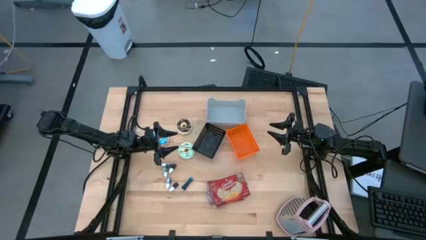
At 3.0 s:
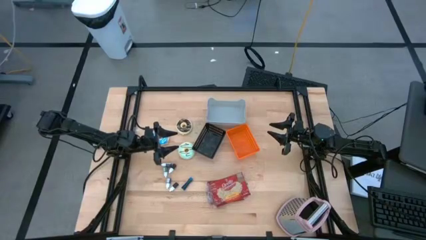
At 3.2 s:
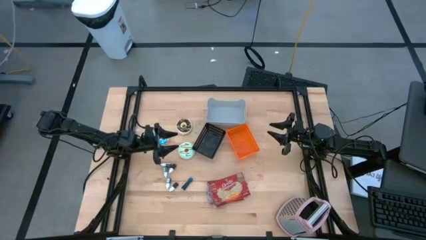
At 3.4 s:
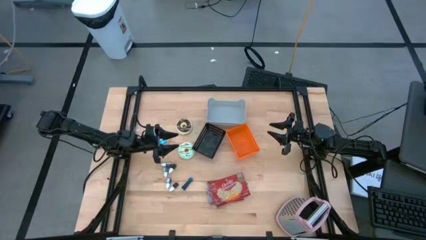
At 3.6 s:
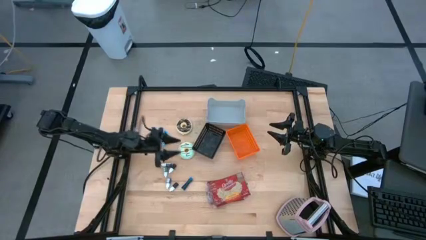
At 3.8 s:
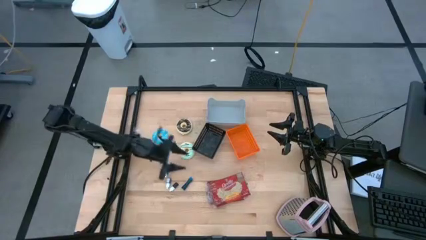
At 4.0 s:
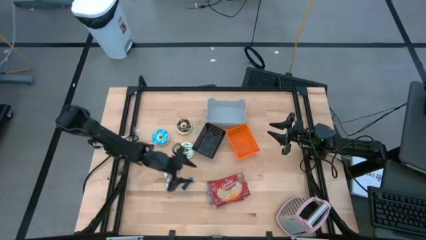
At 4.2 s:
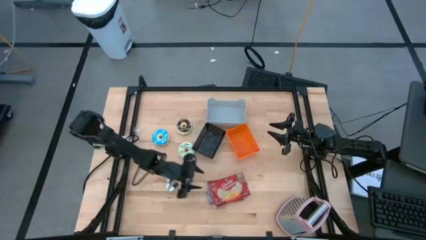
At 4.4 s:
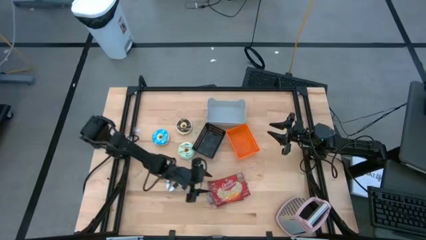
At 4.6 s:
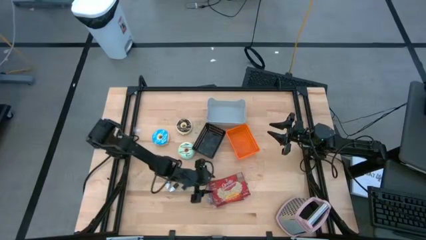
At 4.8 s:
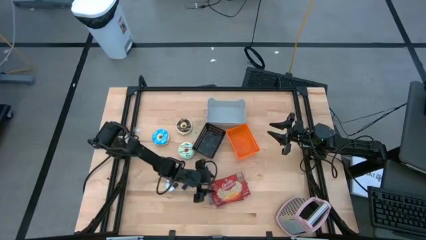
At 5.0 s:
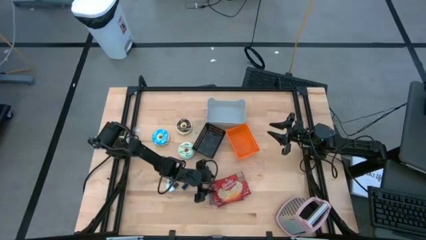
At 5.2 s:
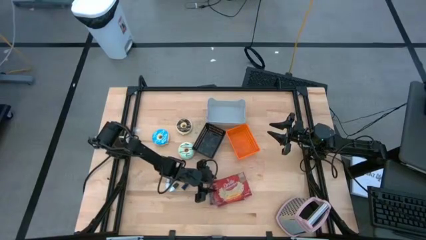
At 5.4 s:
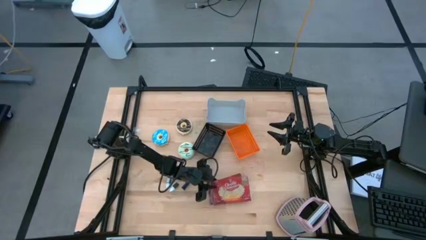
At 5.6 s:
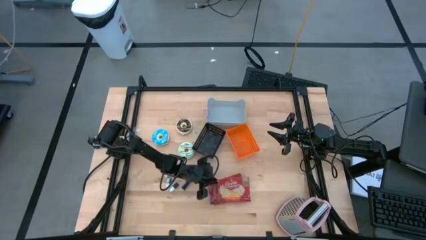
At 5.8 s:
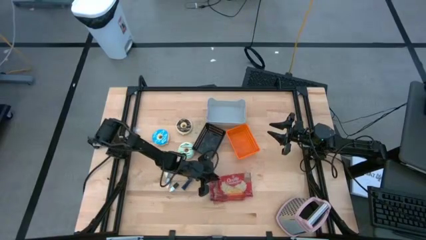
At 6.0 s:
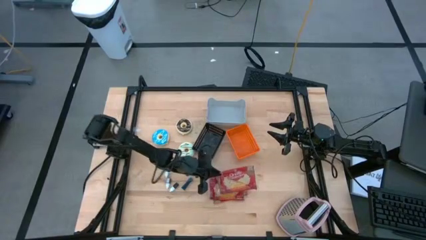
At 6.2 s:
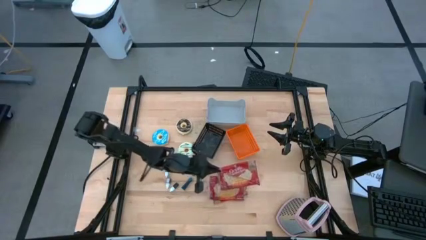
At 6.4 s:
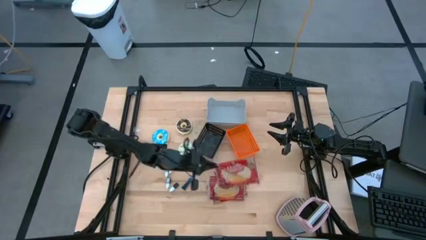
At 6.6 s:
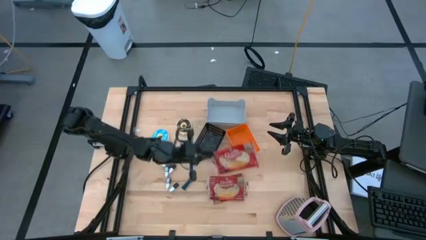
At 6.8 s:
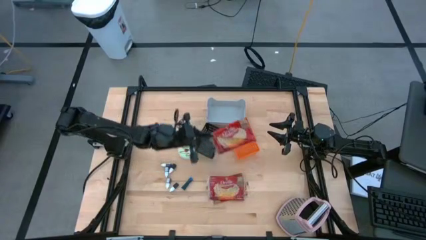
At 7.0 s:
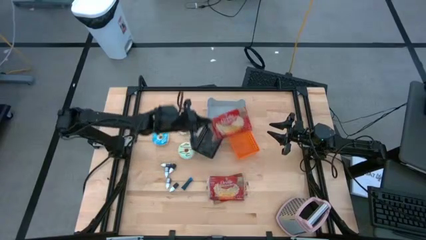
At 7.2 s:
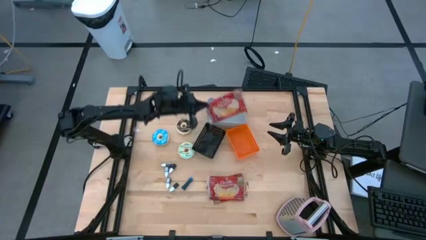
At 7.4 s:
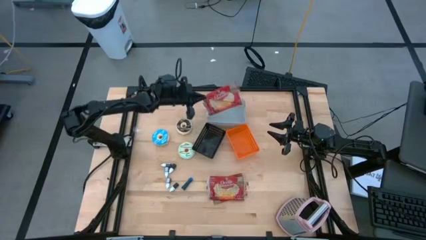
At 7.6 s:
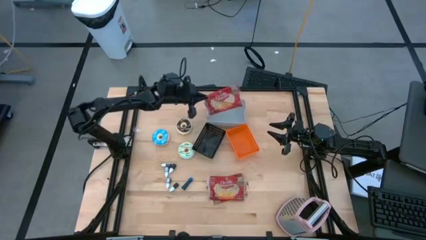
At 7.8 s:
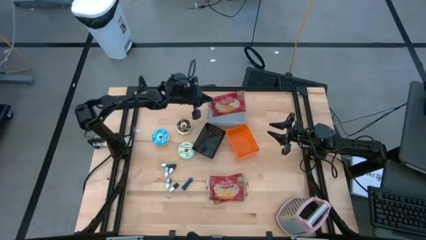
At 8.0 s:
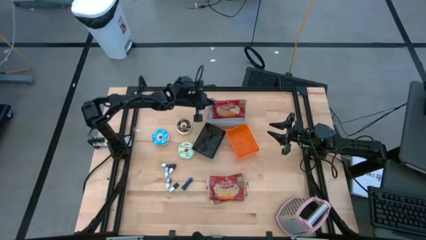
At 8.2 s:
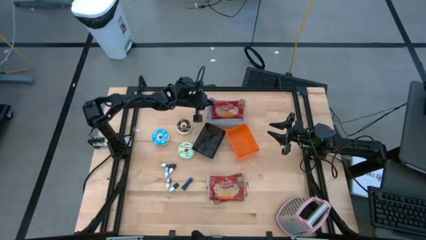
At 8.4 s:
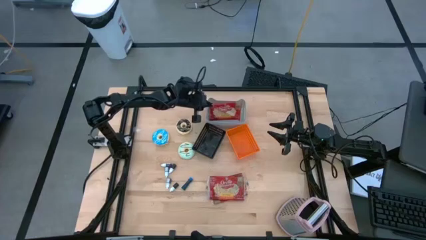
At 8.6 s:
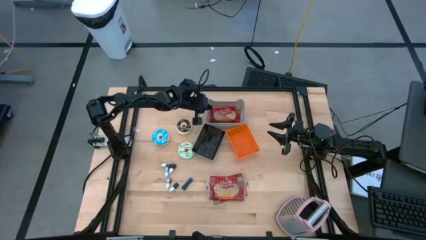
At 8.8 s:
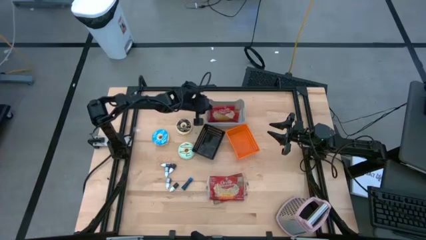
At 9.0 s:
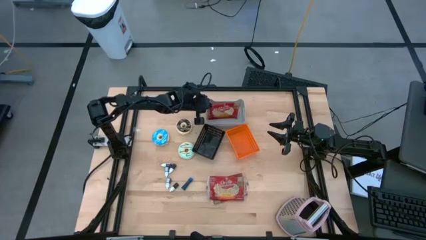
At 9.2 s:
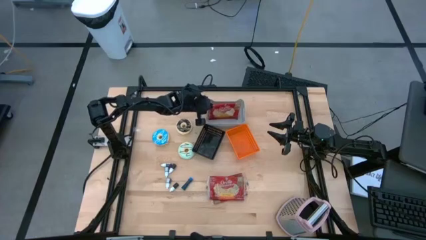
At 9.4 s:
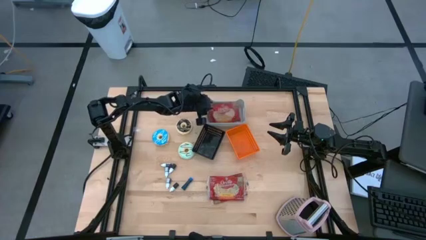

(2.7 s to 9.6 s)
Put the red popcorn bag into the white bin

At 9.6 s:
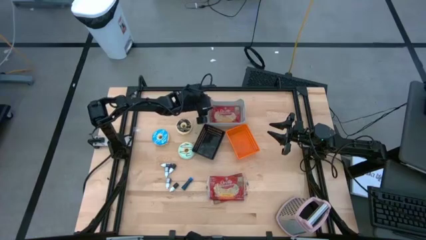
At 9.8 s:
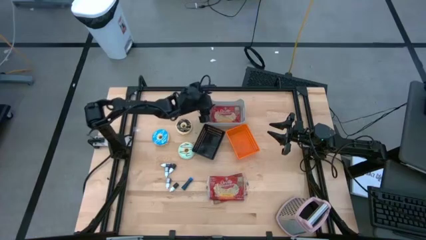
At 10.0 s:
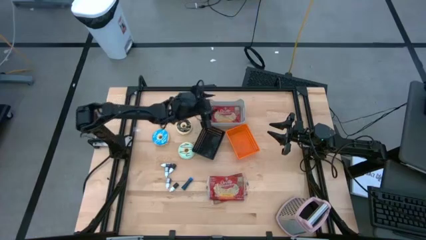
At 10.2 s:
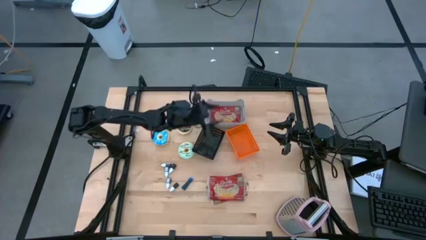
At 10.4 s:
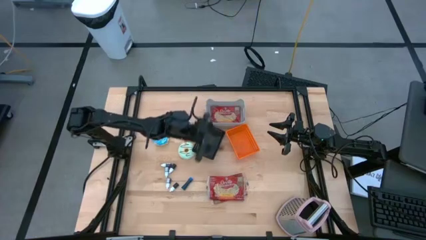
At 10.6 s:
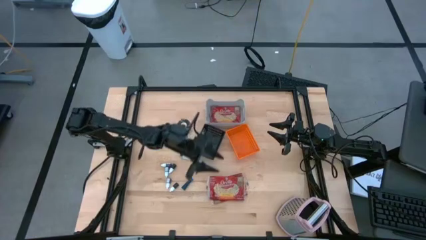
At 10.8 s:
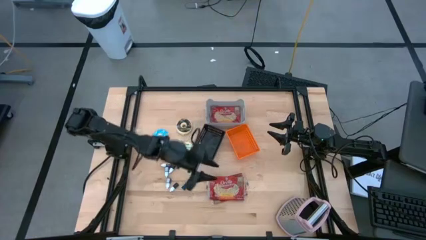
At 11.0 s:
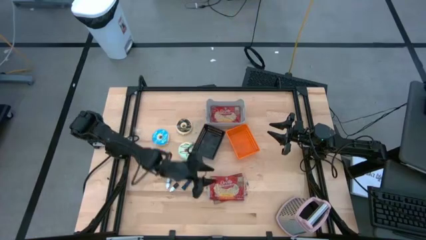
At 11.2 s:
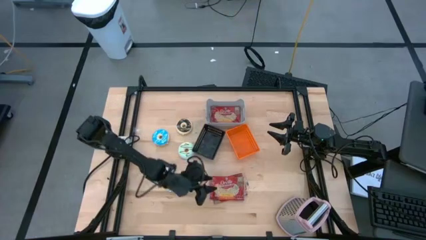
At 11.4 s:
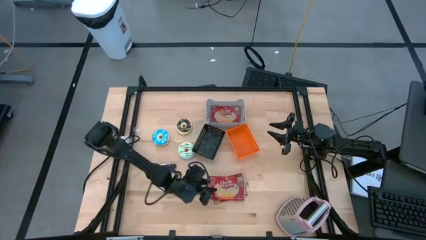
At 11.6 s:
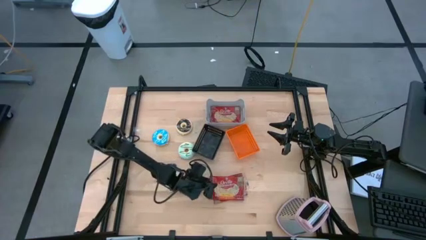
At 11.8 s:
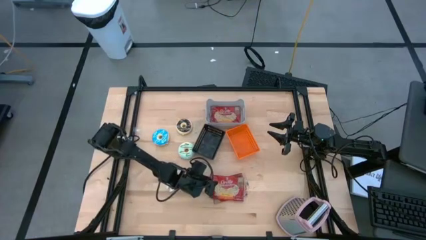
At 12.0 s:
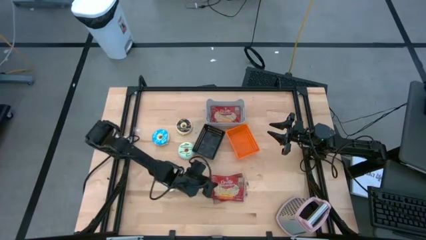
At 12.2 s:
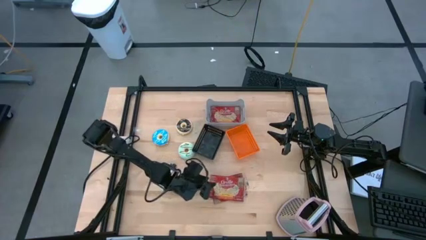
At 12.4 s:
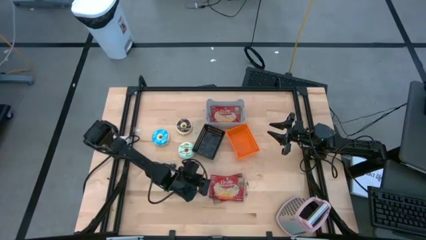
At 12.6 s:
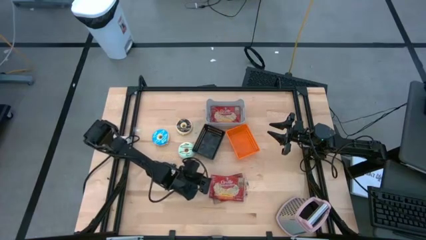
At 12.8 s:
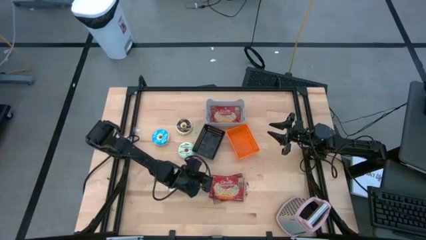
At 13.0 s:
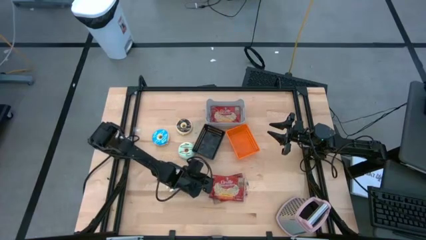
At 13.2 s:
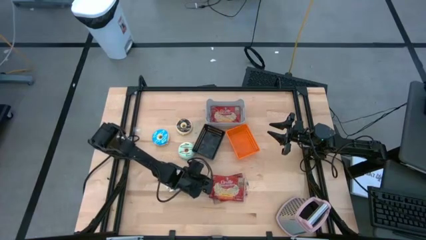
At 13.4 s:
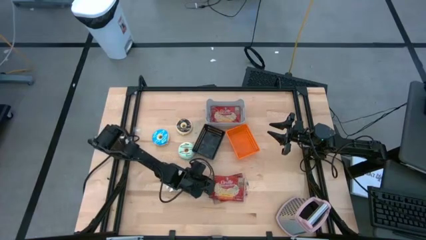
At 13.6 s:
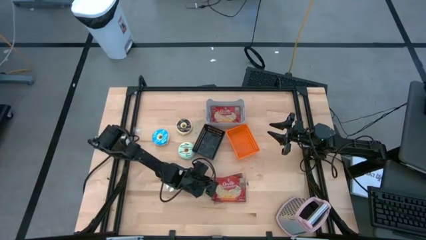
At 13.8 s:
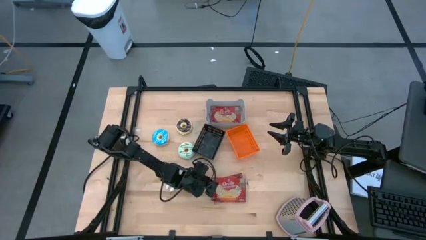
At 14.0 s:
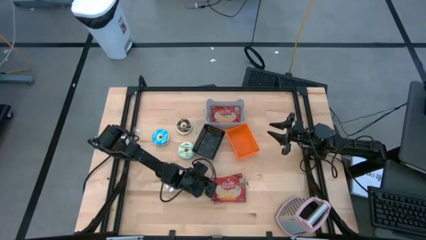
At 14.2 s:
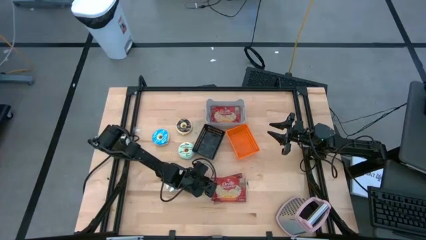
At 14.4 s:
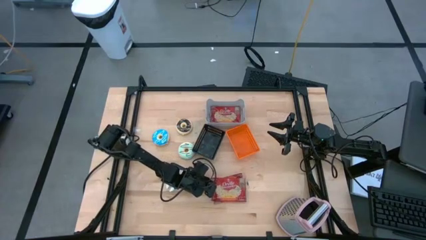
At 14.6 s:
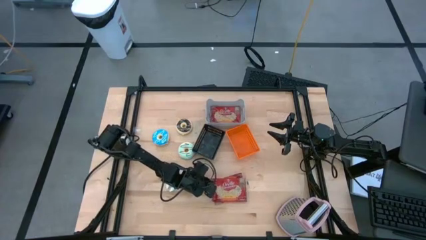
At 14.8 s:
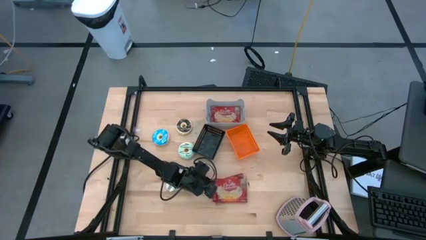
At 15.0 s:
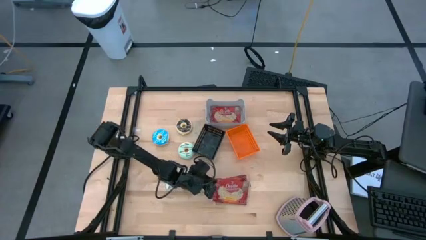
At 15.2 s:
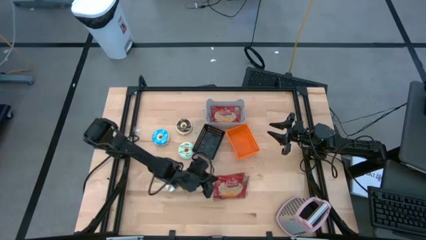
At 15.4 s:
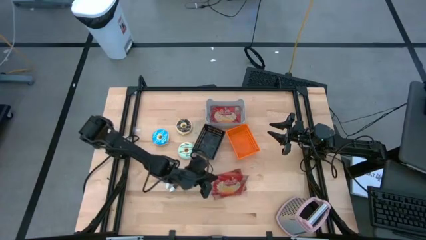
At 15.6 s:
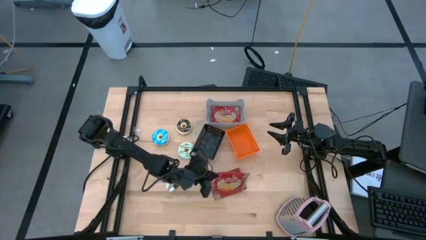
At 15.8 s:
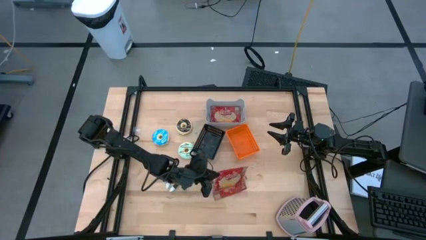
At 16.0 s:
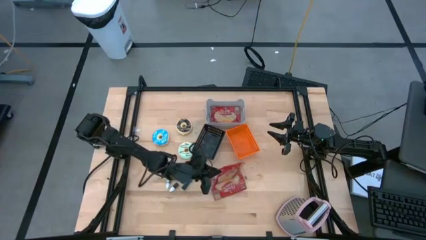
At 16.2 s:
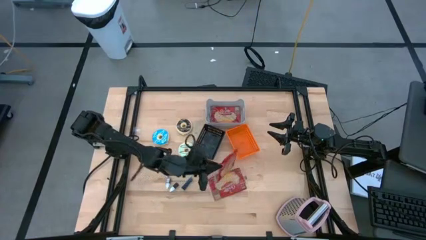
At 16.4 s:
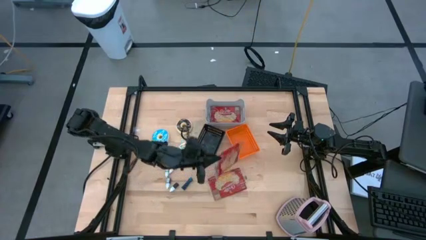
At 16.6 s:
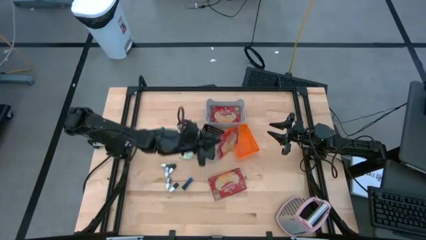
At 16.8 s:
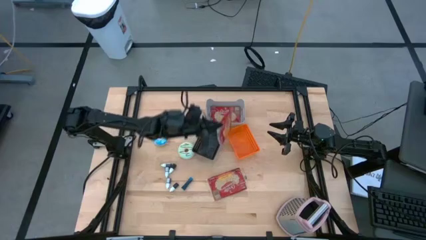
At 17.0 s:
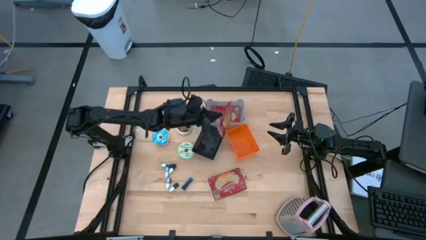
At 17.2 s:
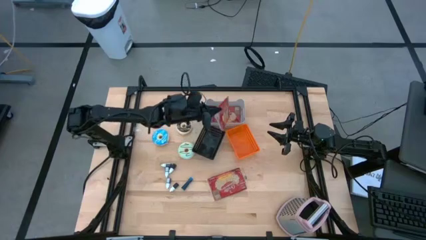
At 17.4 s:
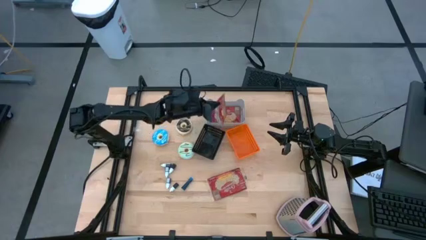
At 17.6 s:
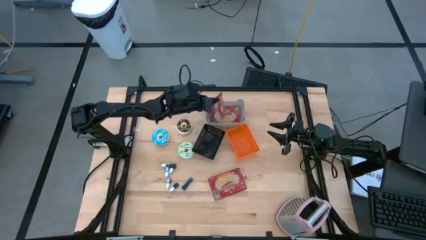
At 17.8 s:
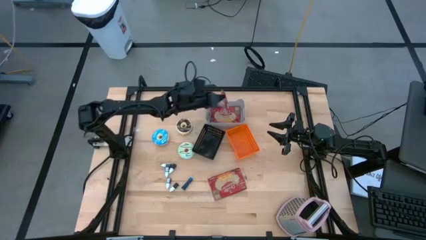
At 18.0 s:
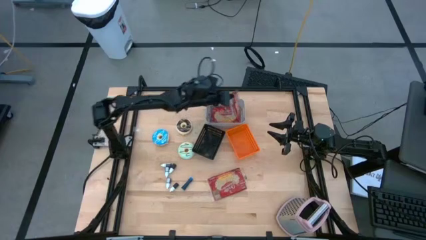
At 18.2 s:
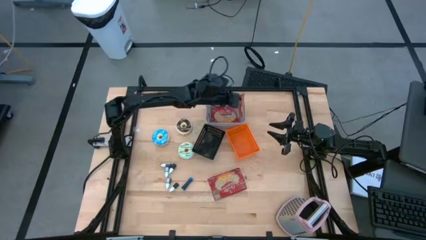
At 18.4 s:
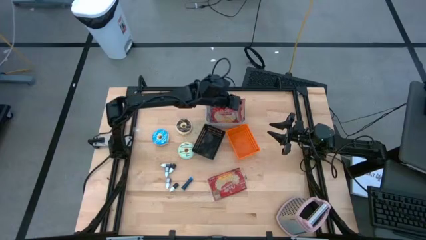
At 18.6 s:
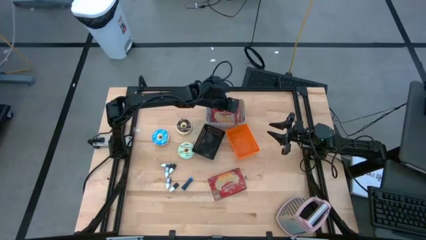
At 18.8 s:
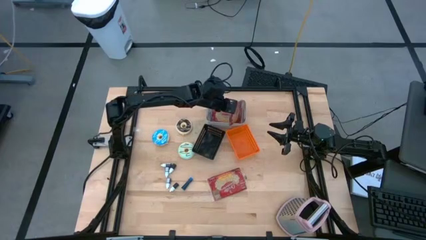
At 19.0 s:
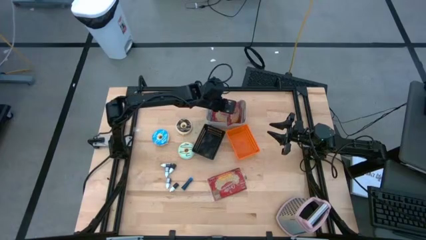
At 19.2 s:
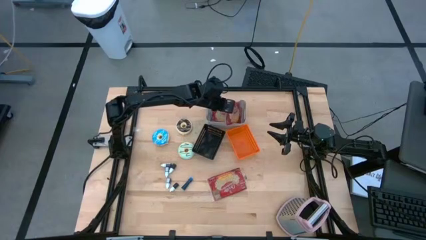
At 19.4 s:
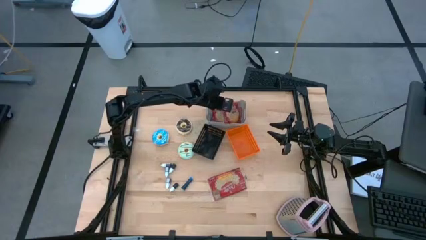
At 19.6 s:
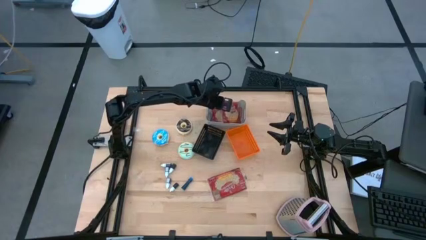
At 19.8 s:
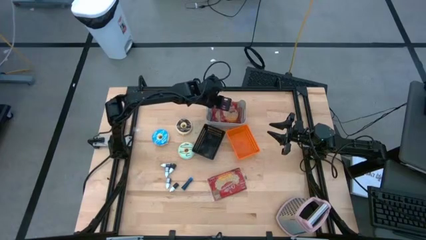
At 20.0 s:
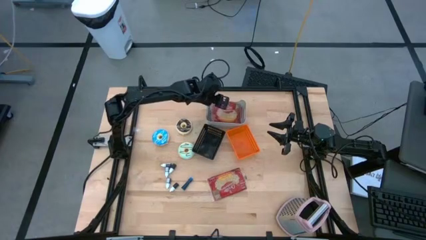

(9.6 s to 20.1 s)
Put the red popcorn bag into the white bin
